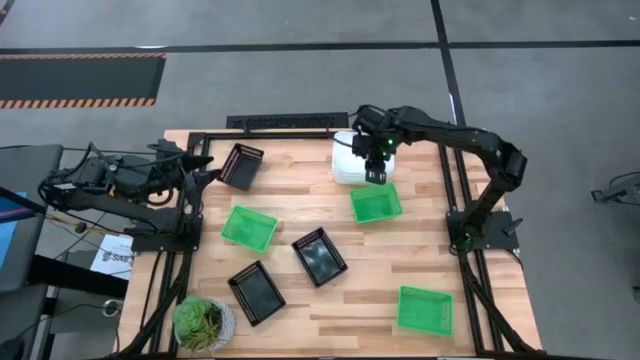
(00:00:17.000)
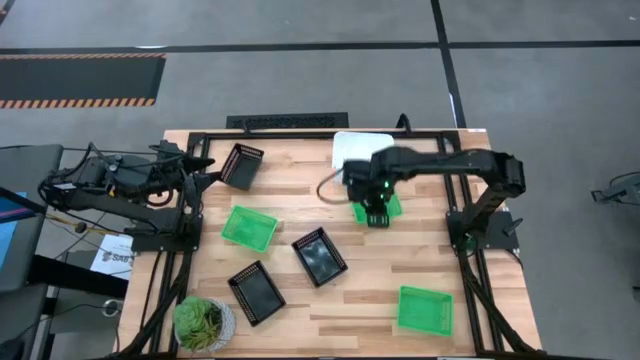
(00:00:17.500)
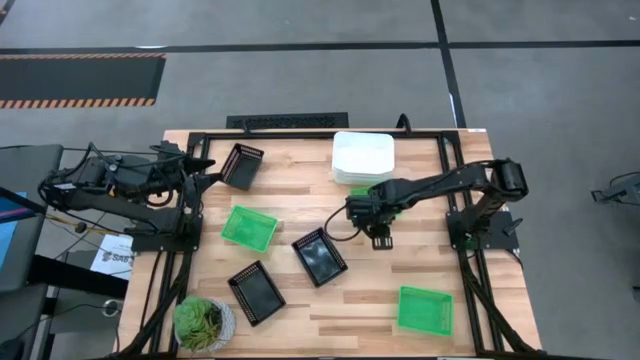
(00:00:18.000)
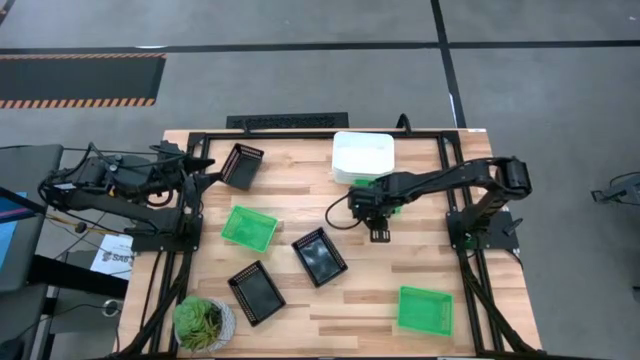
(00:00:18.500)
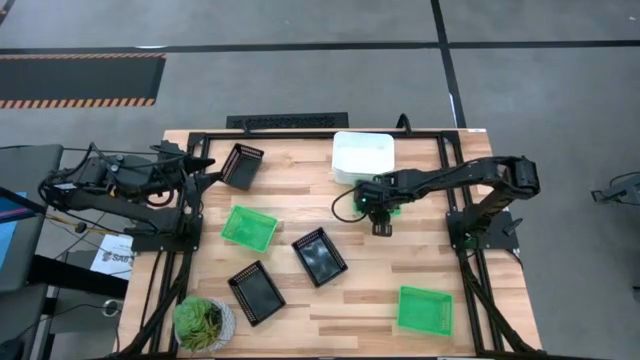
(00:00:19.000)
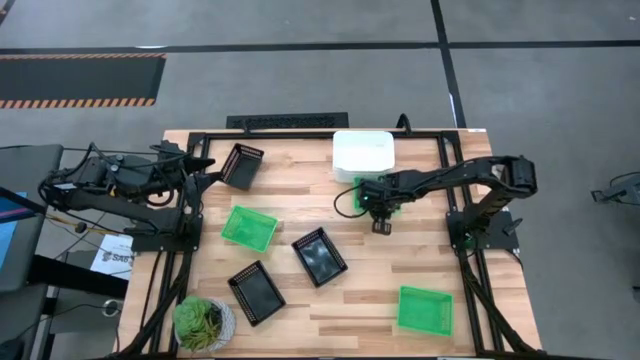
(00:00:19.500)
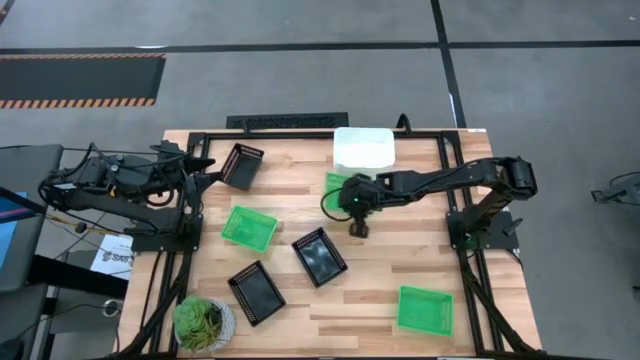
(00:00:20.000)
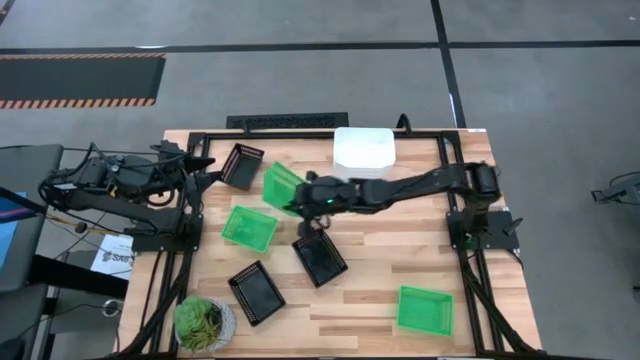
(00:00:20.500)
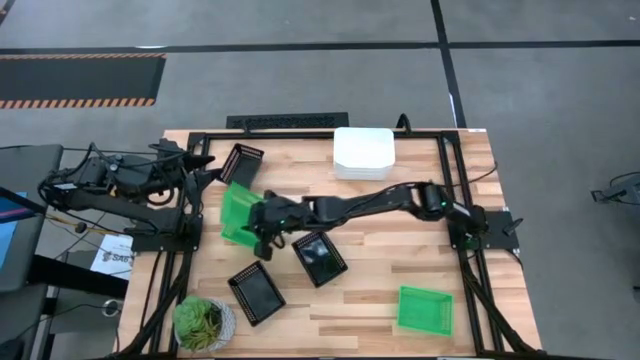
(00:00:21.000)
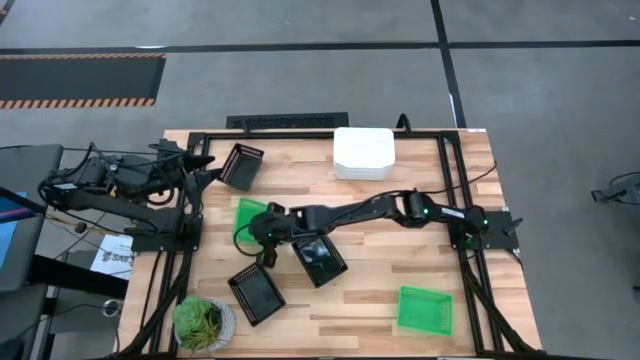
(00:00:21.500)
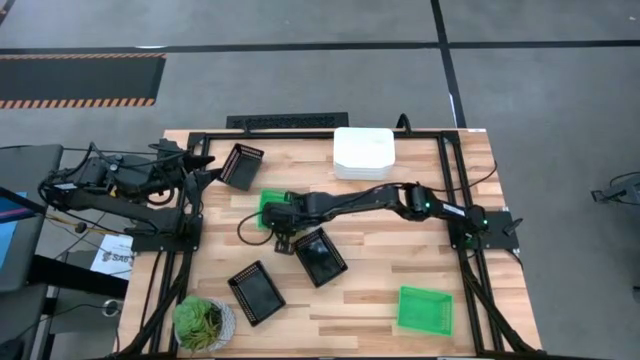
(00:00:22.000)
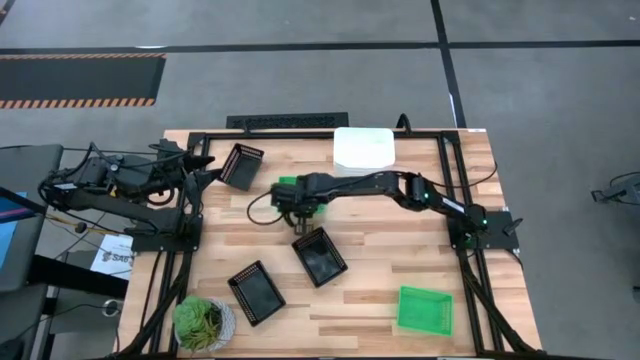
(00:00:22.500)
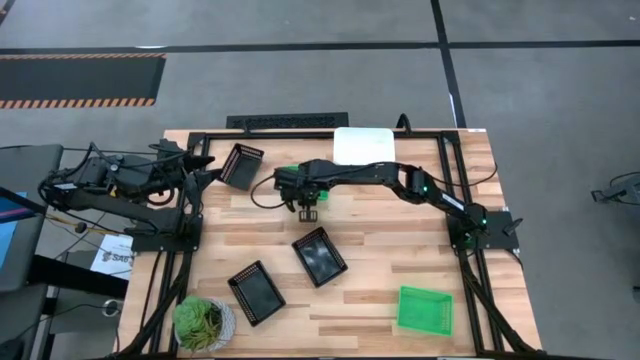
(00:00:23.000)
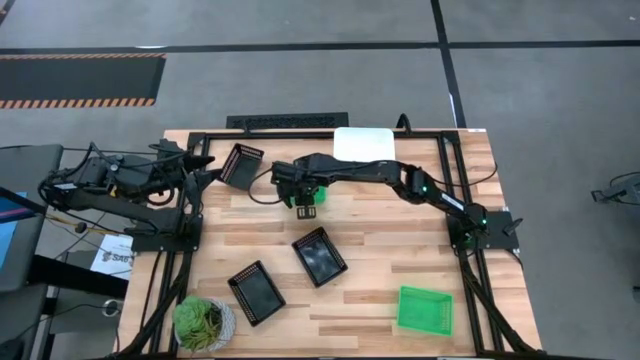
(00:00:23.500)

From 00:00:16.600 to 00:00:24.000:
Stack the top right green bin on the left green bin

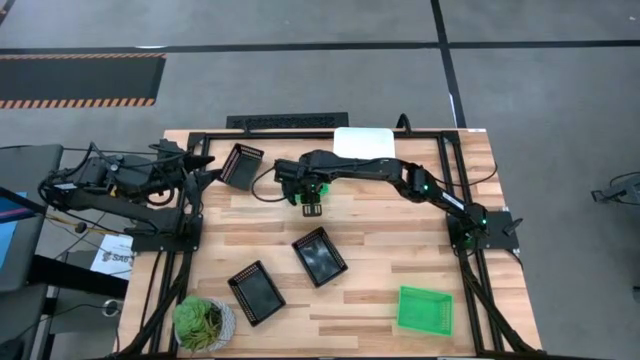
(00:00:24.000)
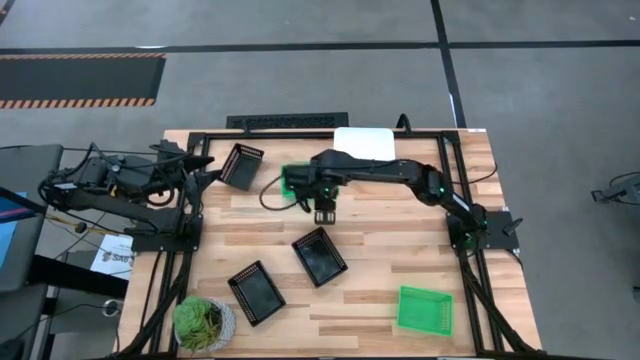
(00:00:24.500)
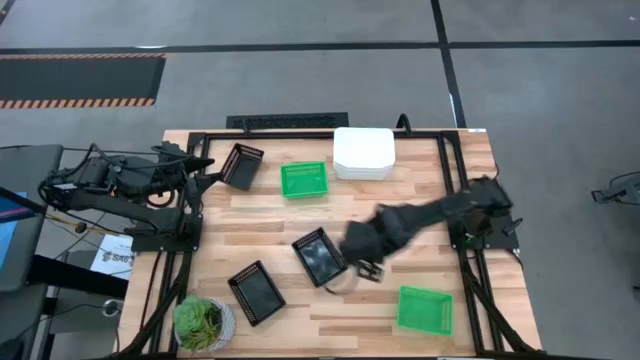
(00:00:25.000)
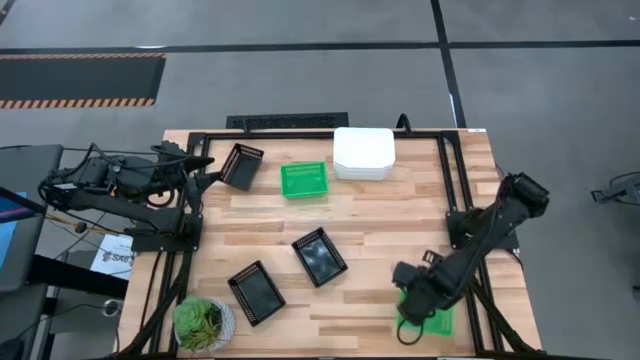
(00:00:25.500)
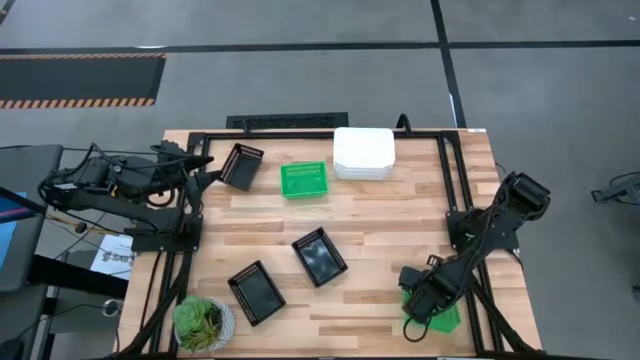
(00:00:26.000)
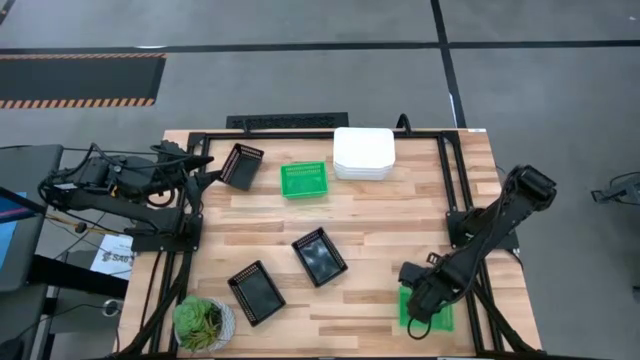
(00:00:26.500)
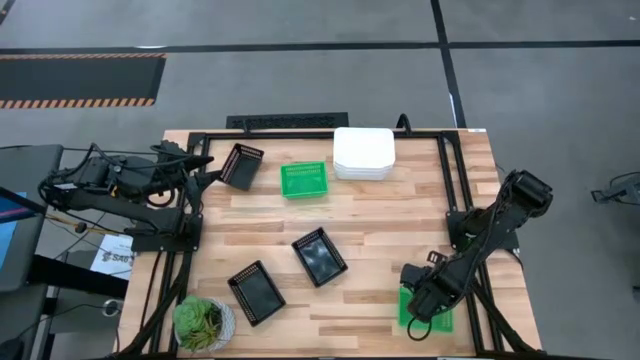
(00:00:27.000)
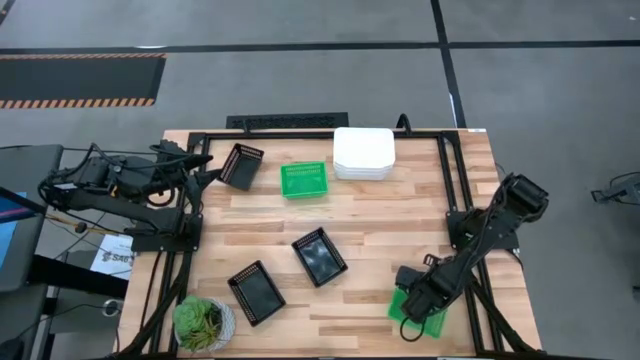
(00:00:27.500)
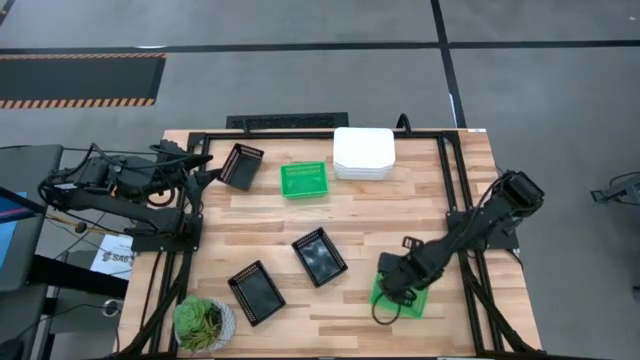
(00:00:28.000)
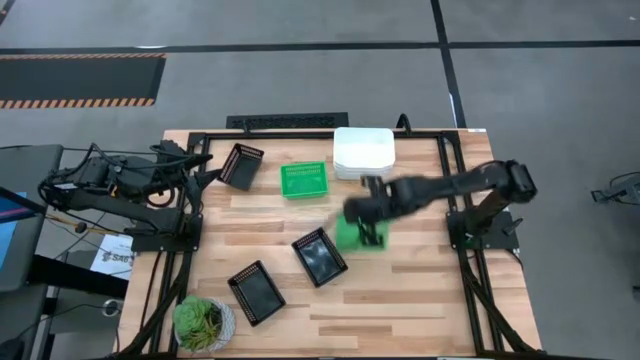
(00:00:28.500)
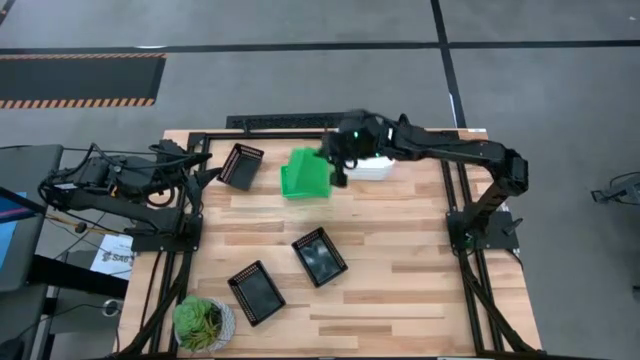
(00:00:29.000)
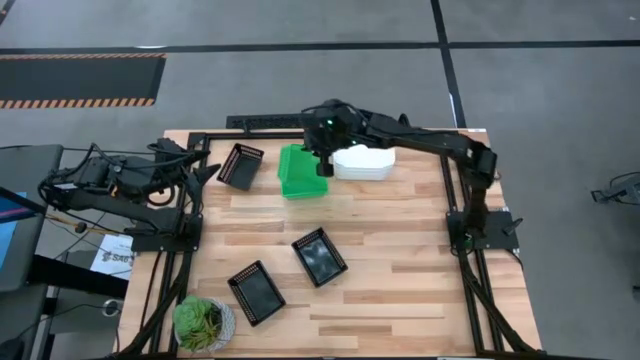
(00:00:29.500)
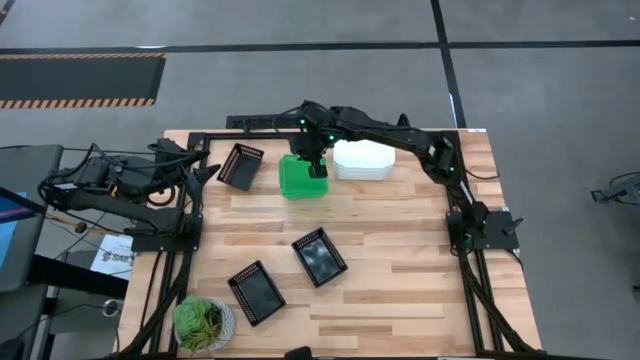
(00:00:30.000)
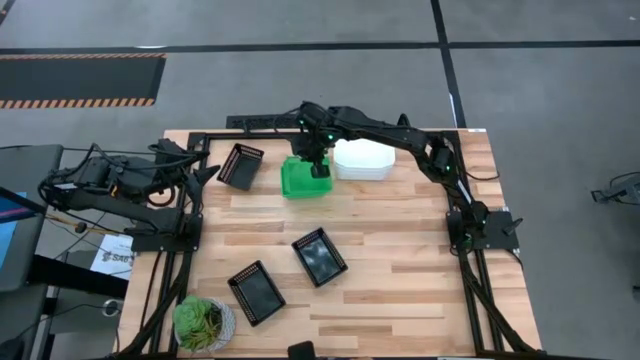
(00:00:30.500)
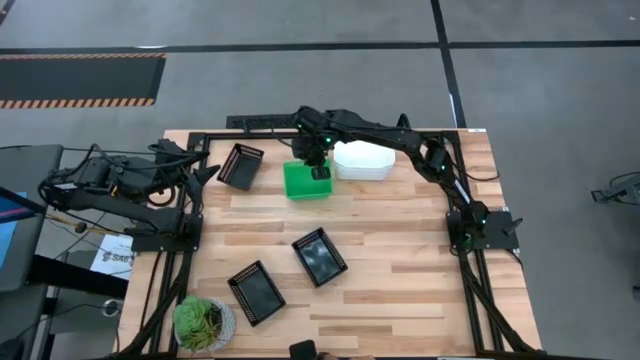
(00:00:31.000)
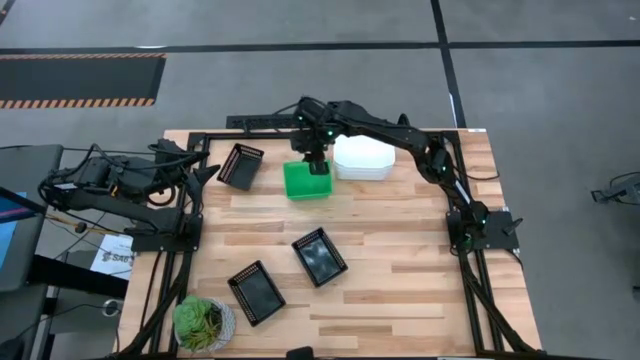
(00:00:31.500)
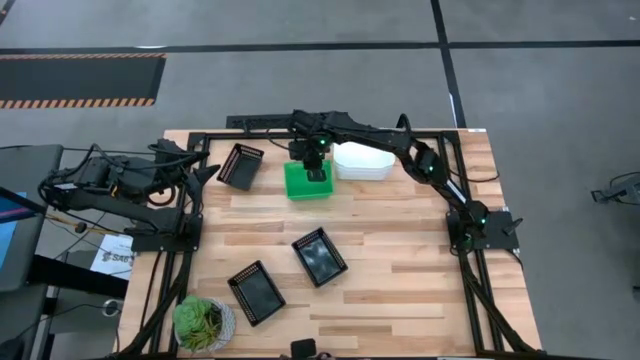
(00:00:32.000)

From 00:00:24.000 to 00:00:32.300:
Stack the bottom green bin on the green bin

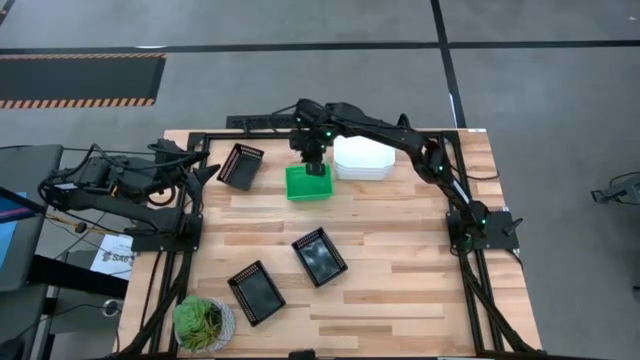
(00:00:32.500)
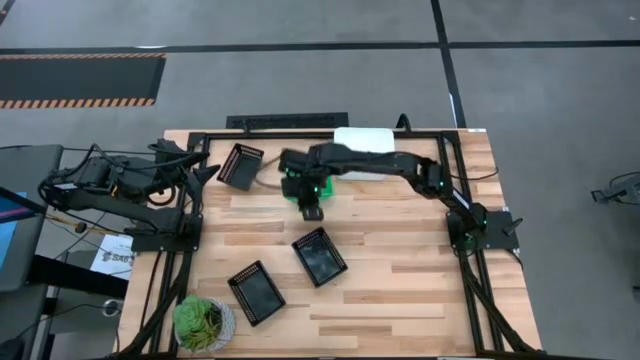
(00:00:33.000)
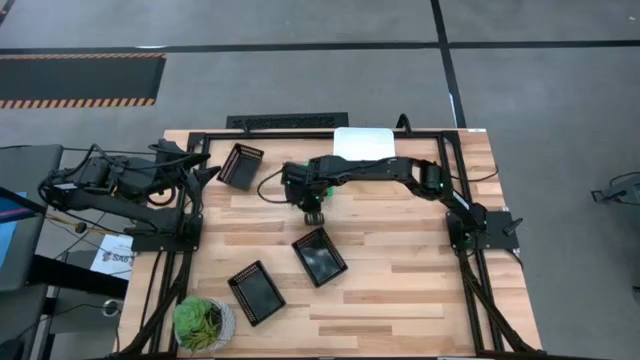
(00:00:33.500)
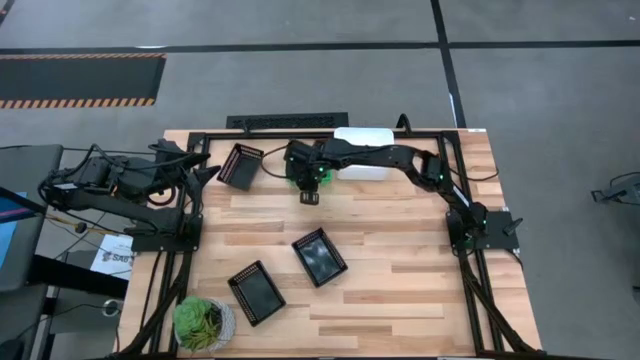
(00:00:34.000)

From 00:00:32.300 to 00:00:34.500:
Move the green bins to the top center of the table

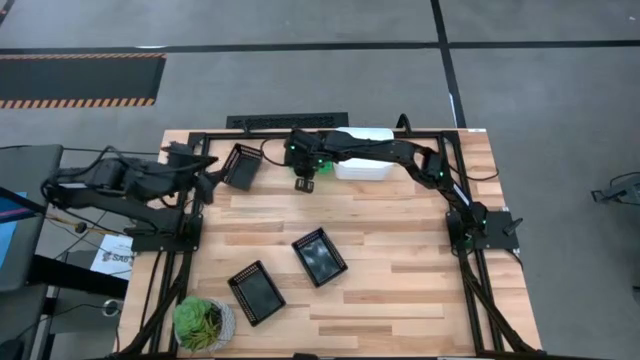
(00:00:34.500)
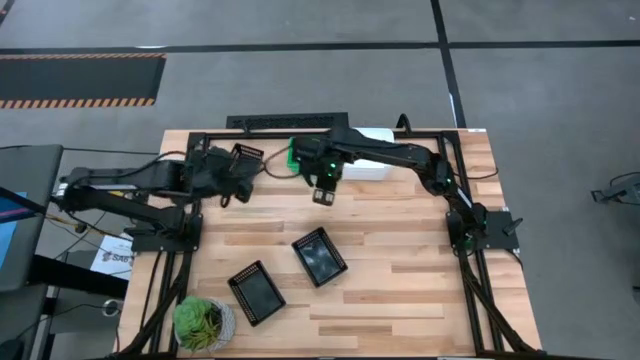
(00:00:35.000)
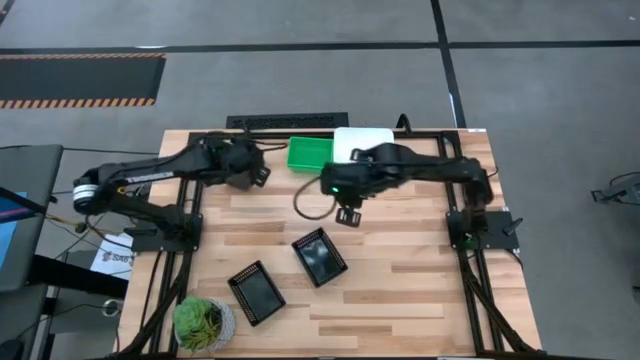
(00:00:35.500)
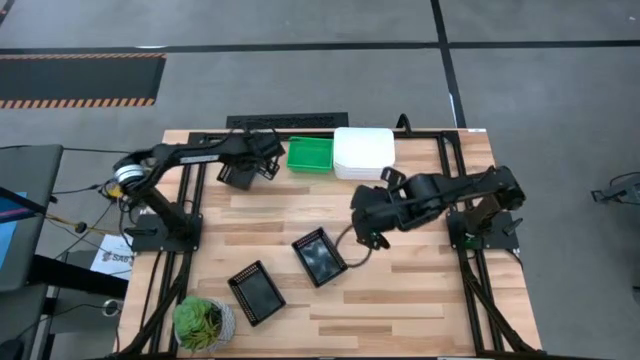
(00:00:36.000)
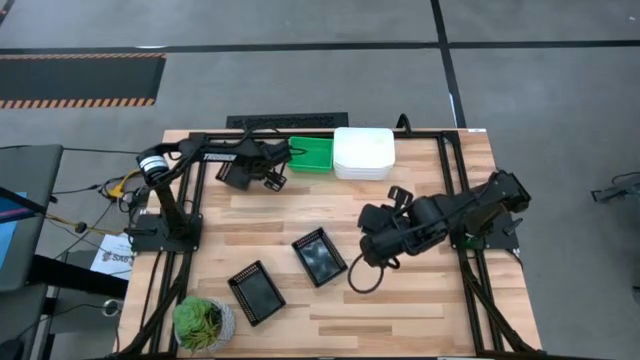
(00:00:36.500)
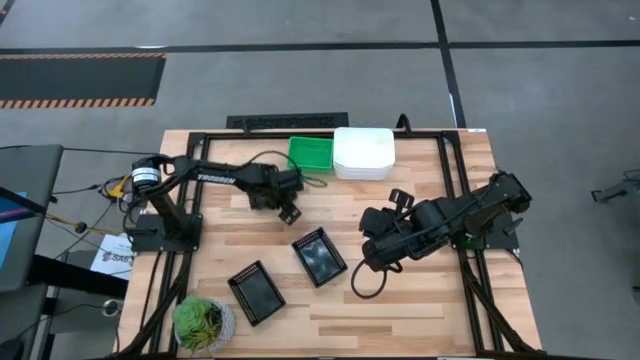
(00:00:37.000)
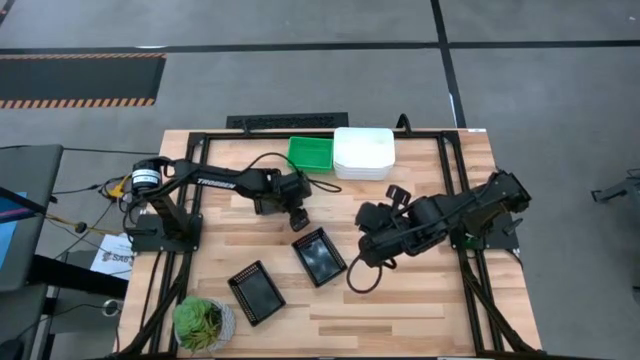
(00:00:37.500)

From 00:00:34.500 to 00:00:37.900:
Move the top black bin to the top center of the table
